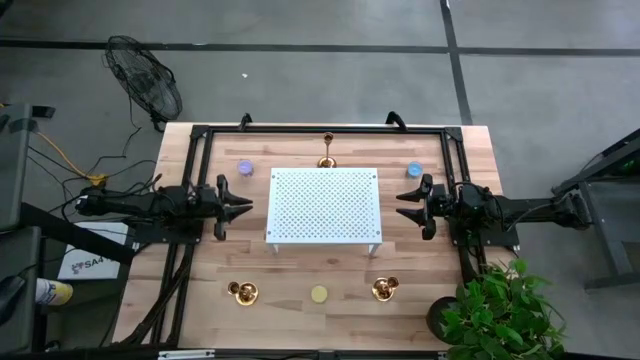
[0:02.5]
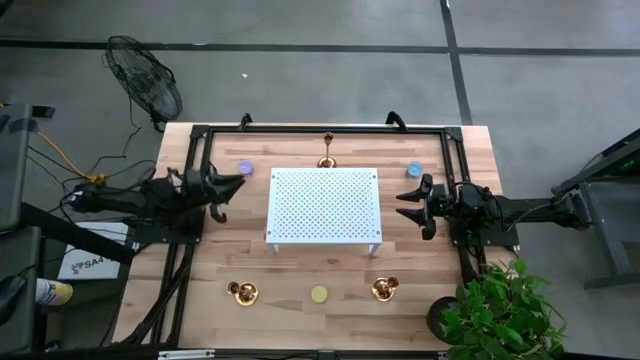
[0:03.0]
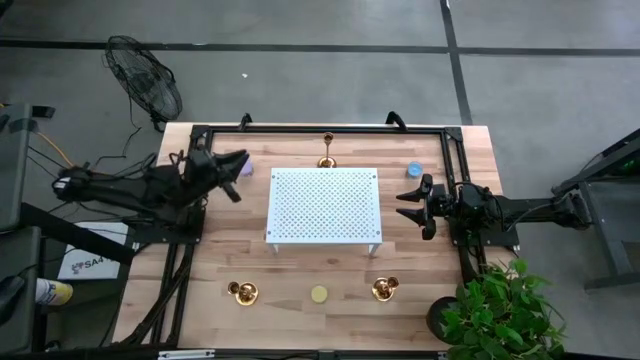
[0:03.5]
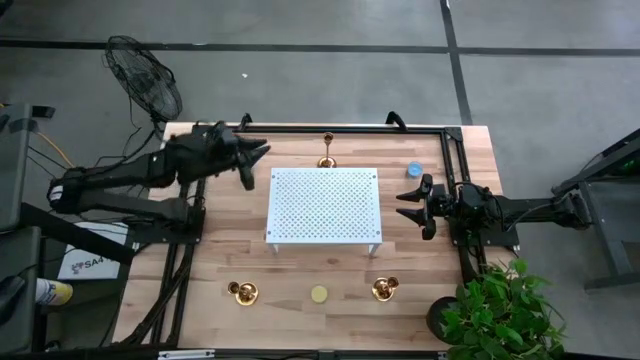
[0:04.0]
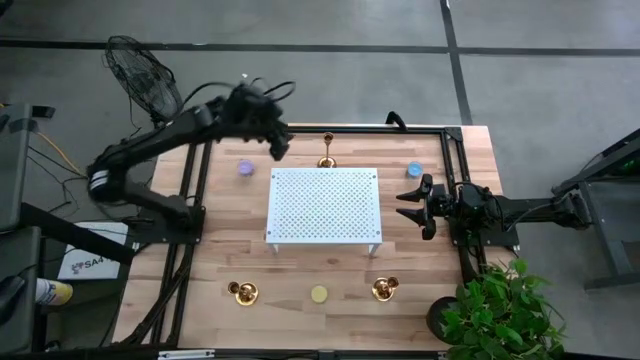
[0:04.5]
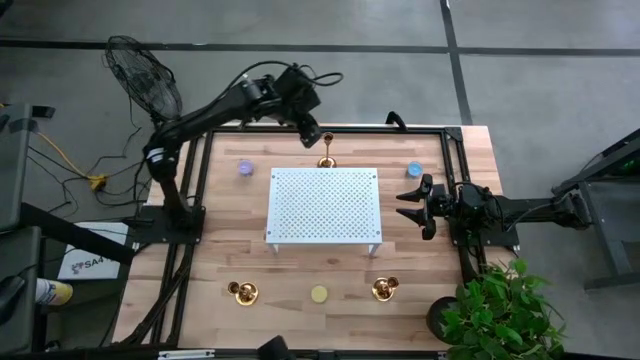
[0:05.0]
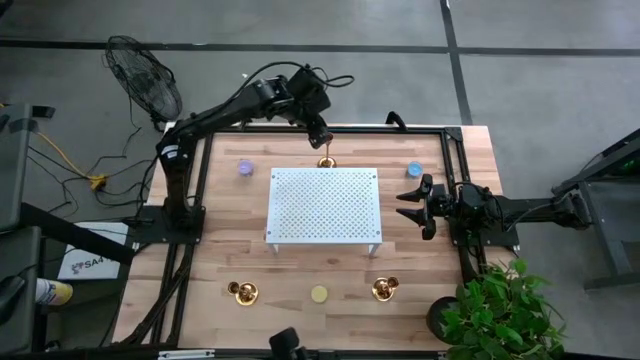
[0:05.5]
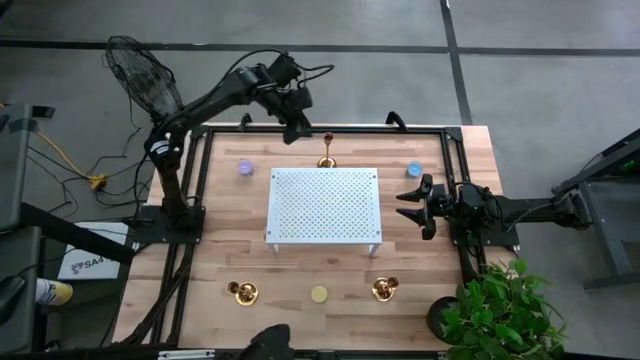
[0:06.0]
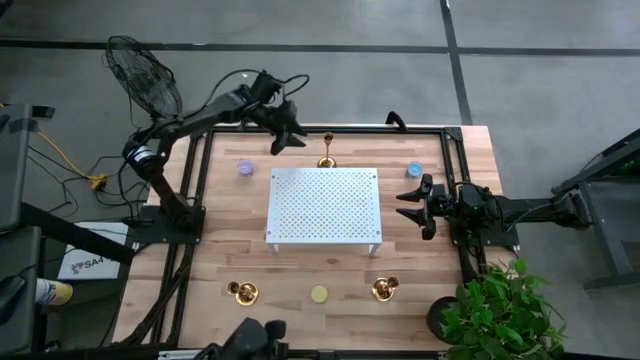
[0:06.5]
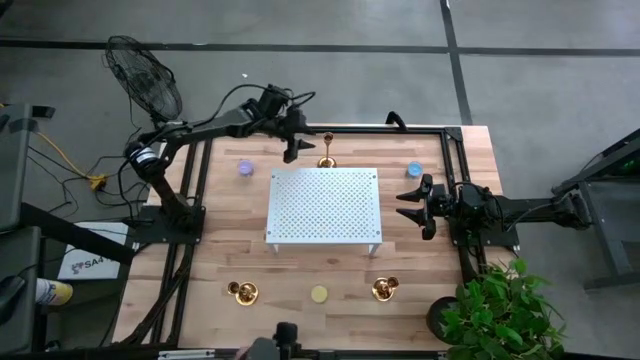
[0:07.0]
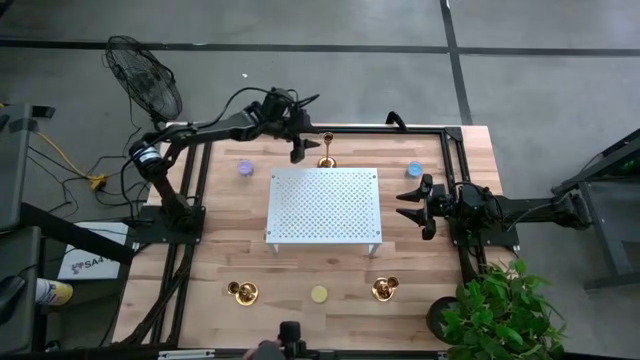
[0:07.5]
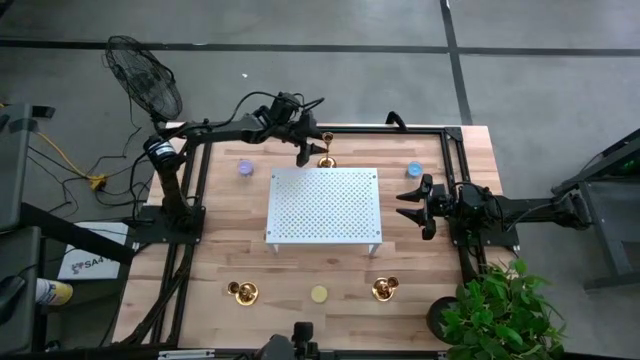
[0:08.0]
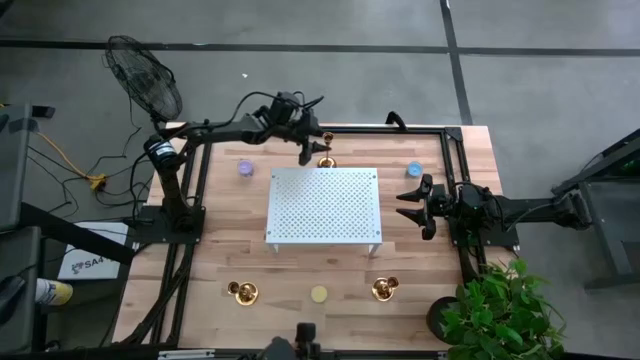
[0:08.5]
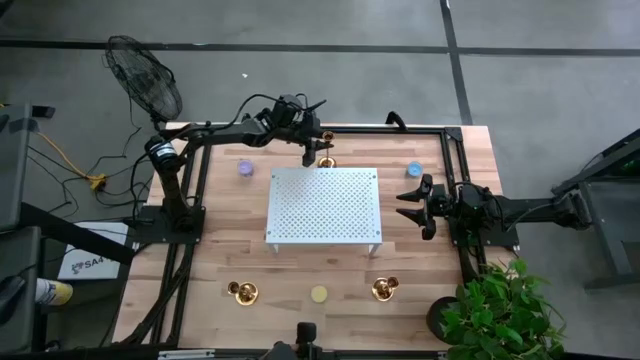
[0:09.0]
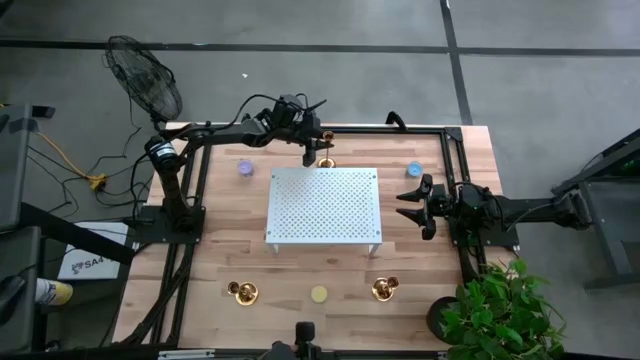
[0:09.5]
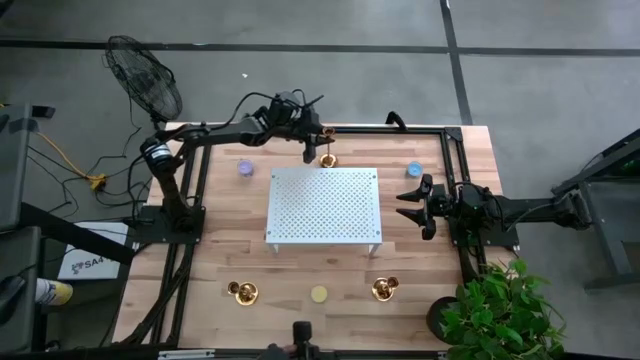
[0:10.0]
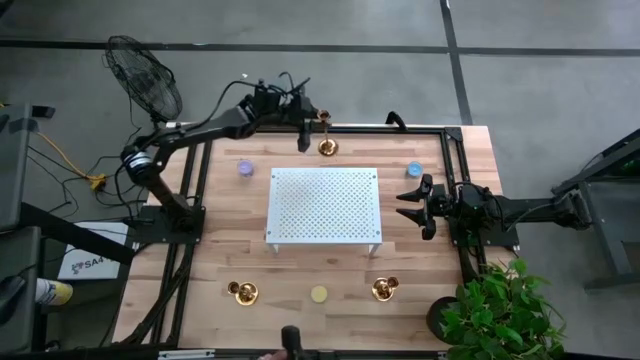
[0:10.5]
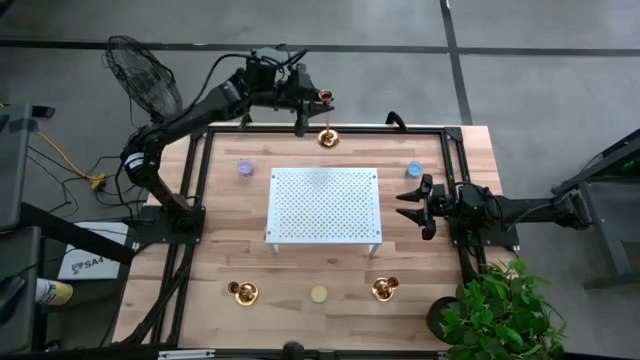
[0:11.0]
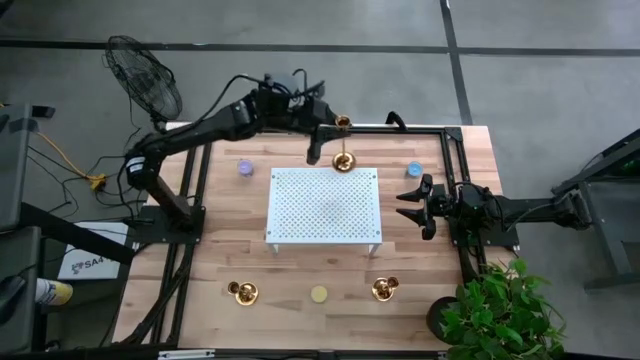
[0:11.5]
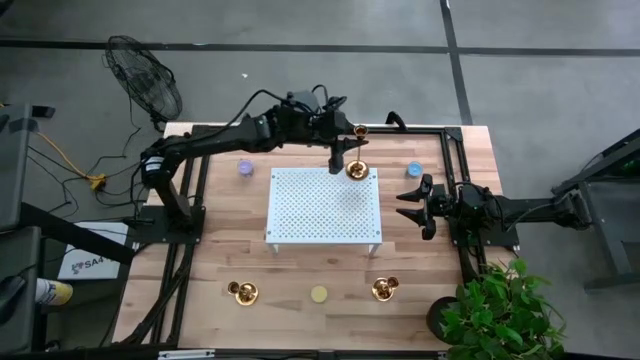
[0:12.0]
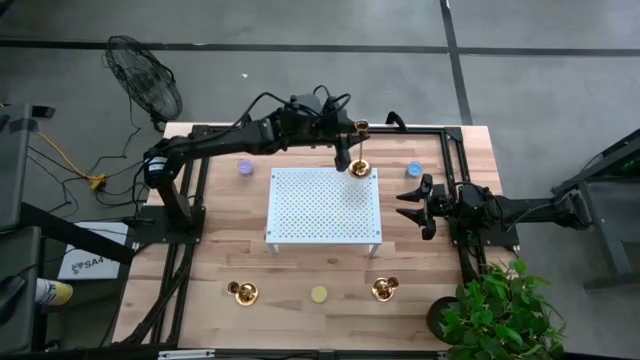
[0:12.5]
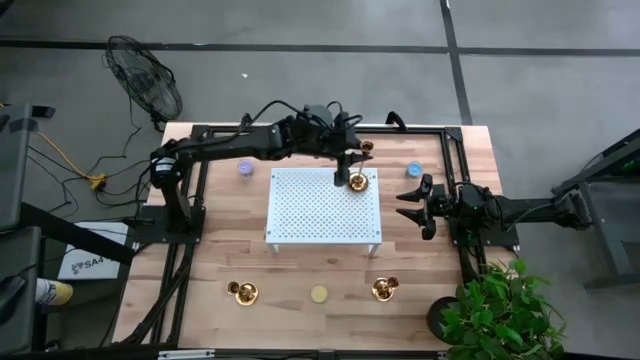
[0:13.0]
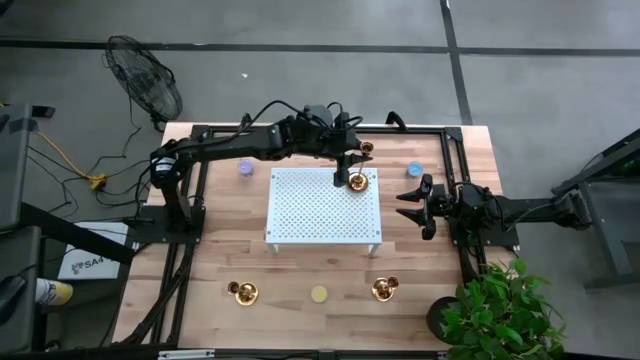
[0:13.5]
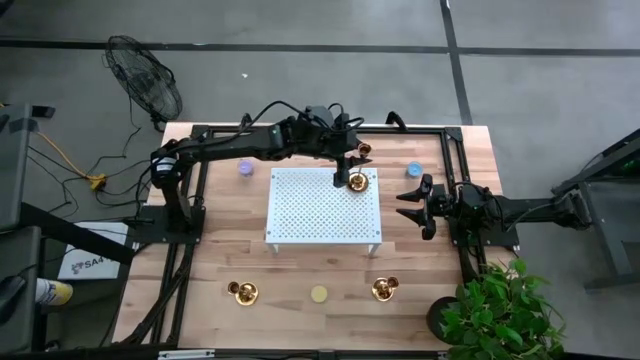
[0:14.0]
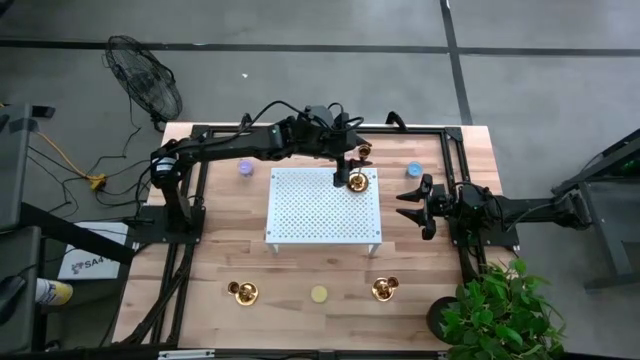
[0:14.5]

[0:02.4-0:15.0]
Task: Pick & Place candle stick holders
Put the top gold candle holder on the shelf

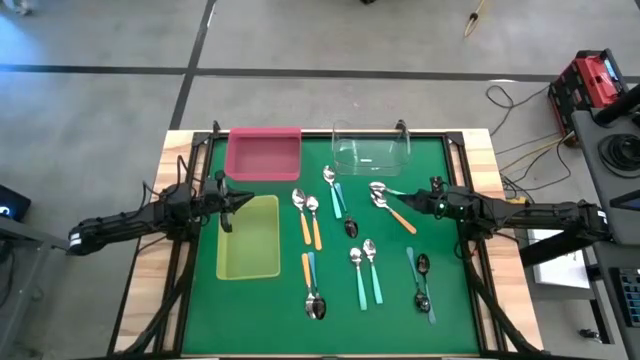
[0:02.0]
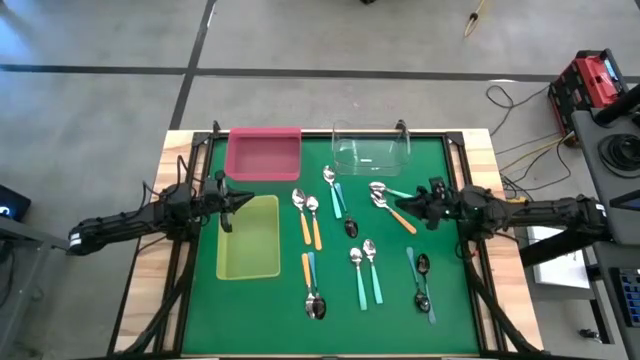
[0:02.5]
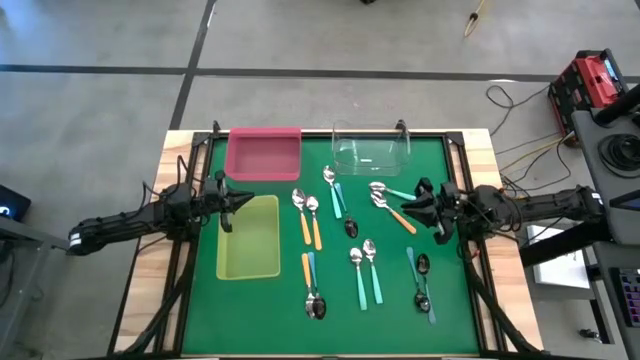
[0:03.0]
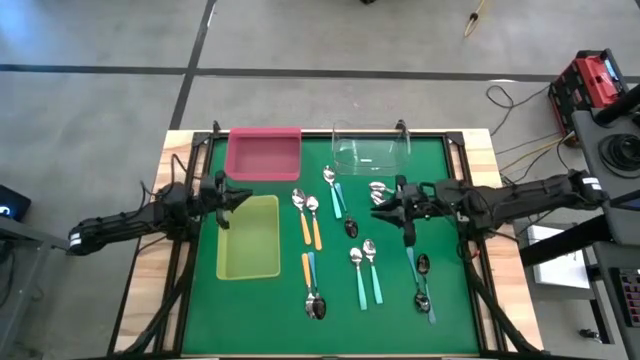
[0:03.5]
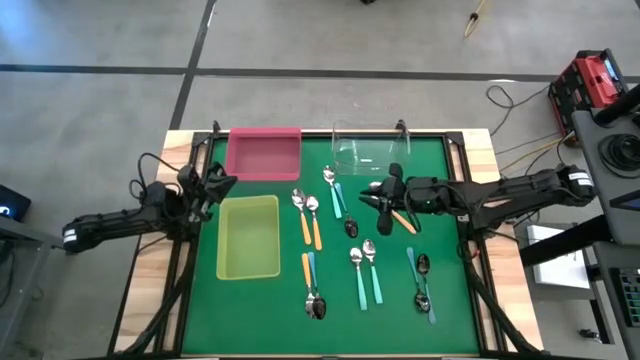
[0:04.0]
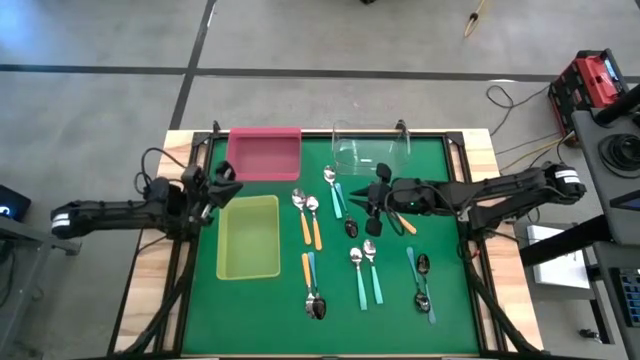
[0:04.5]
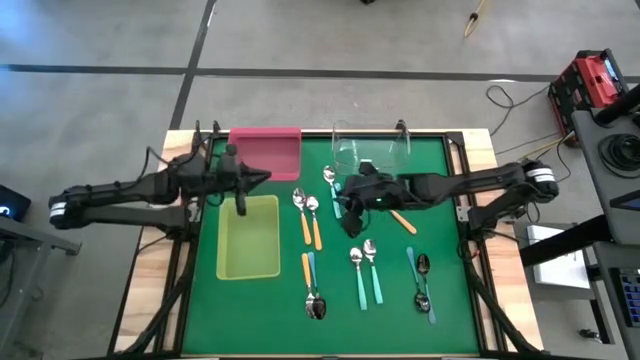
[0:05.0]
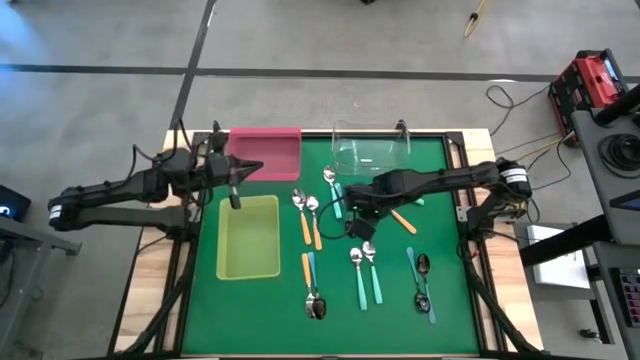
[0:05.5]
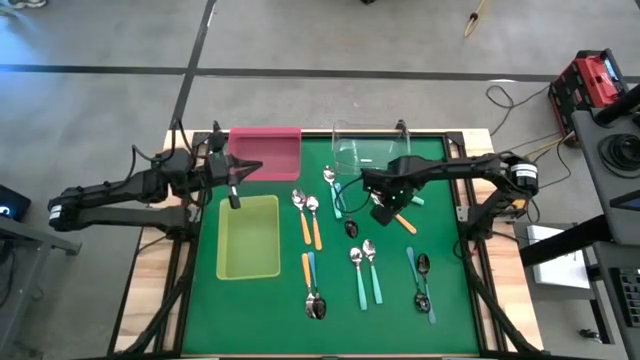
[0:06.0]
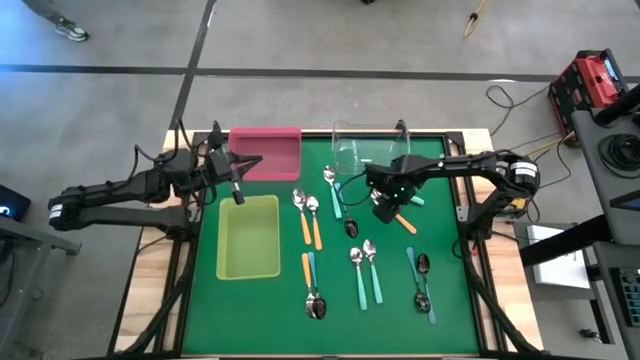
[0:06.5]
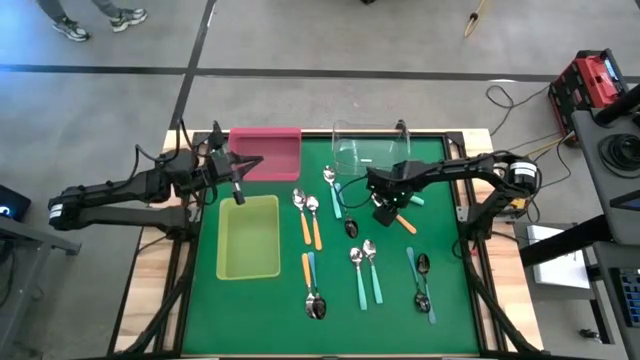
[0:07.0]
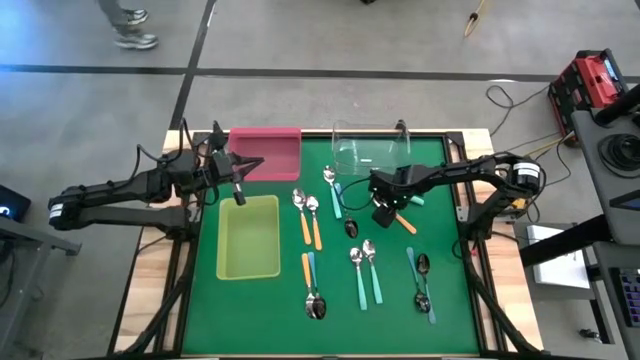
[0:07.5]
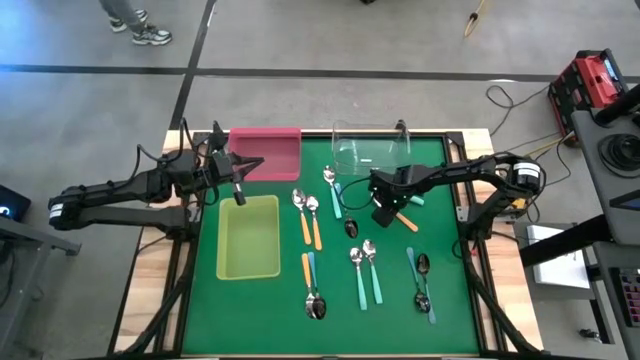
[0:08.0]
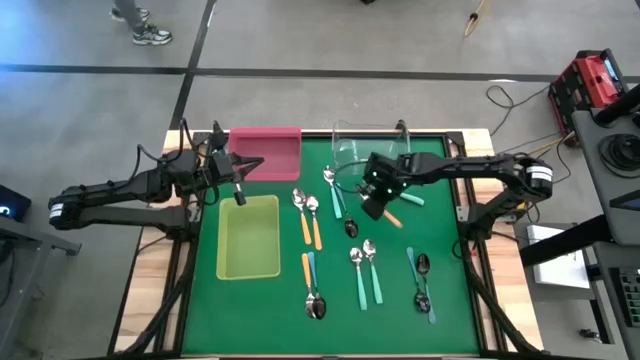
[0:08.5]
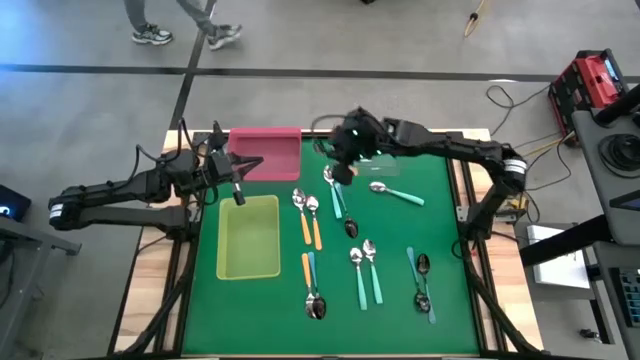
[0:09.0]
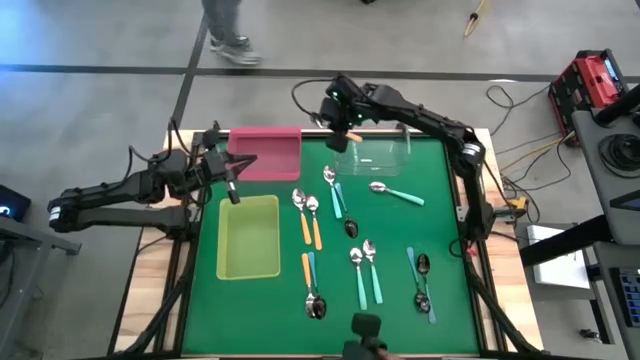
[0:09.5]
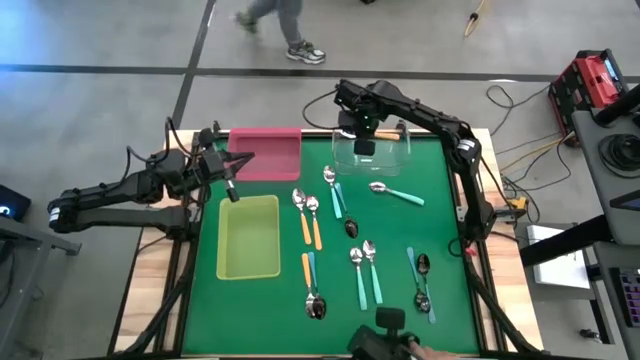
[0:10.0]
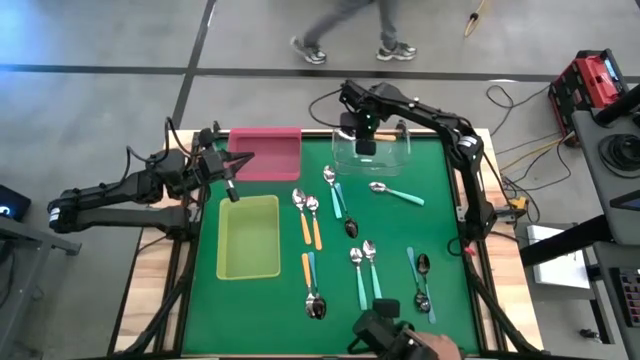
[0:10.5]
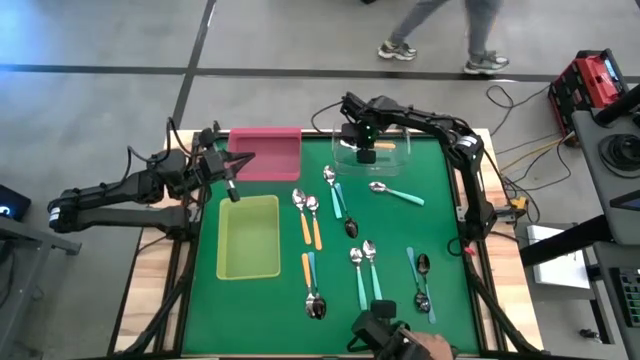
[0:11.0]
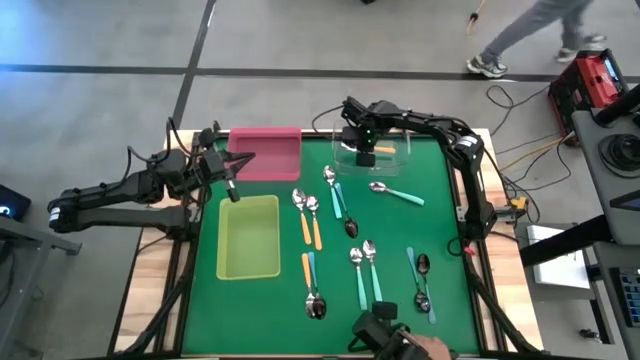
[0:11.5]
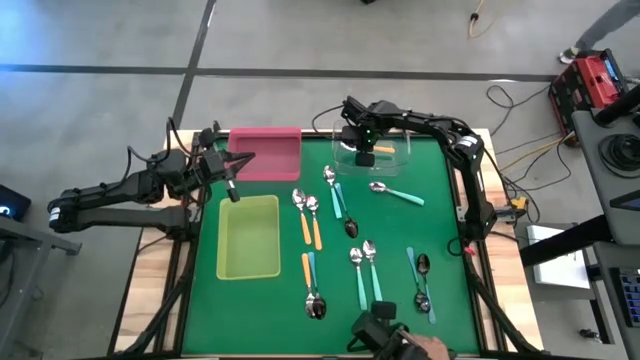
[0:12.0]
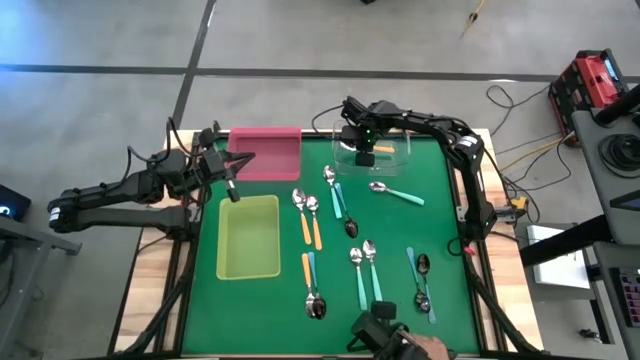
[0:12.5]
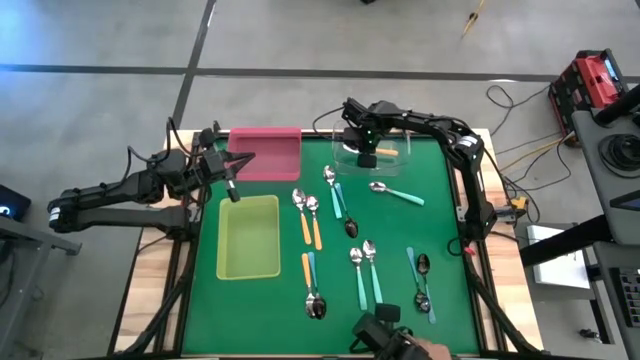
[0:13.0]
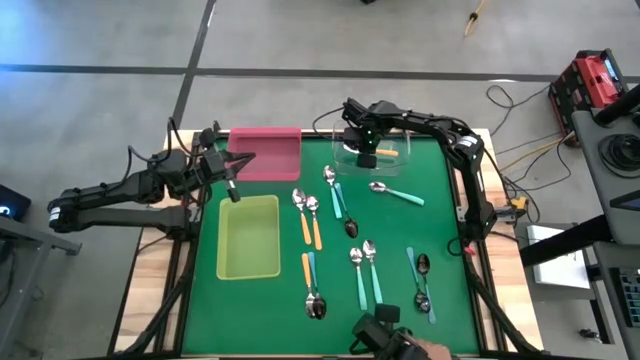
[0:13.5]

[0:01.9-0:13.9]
Task: Sort silverware by color (type)
Put the yellow spoon into the transparent bin
